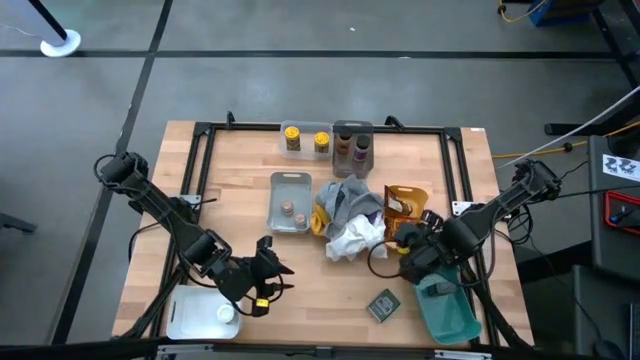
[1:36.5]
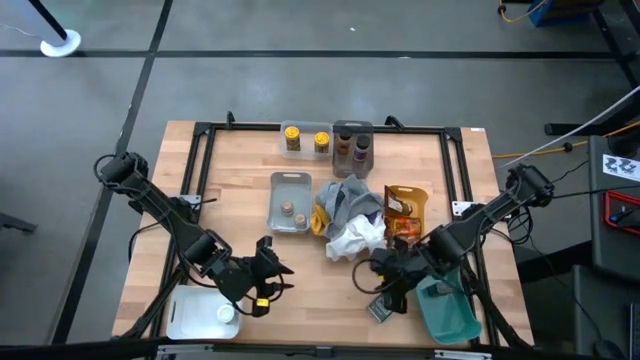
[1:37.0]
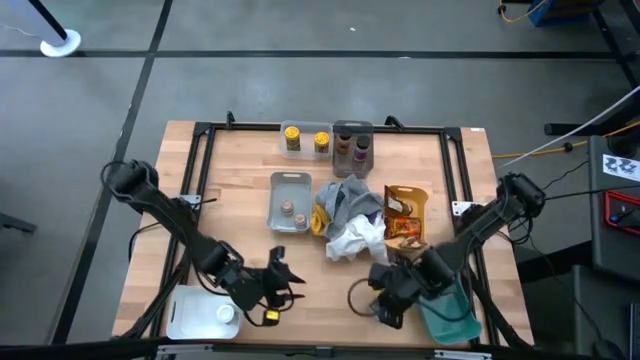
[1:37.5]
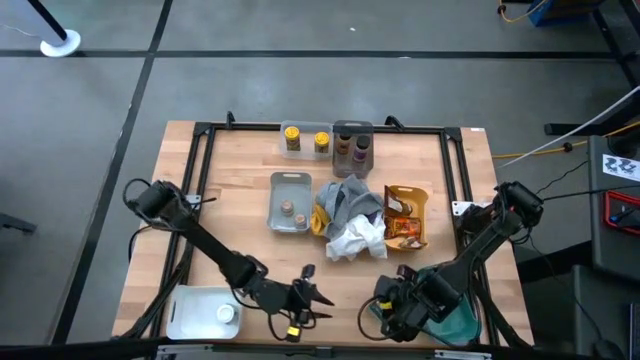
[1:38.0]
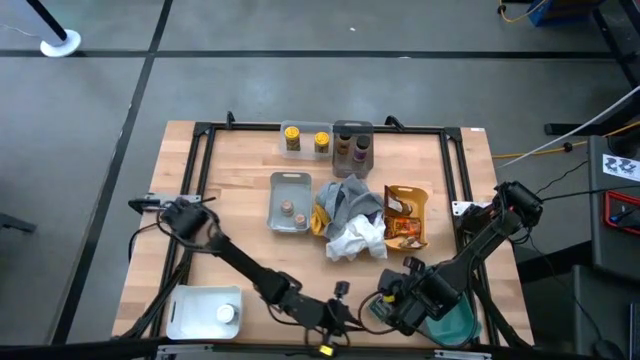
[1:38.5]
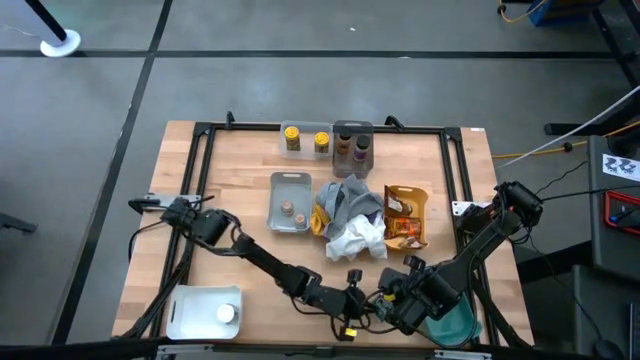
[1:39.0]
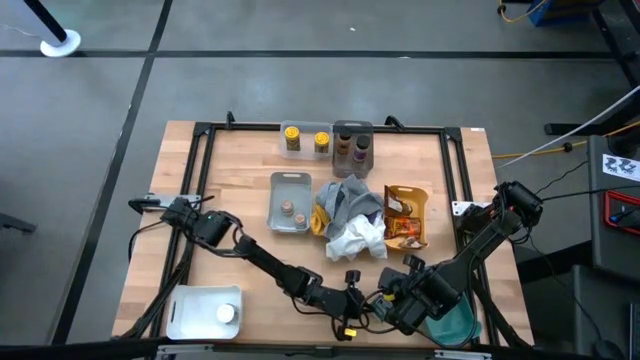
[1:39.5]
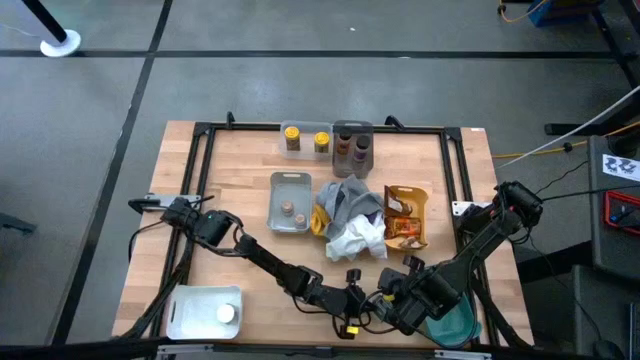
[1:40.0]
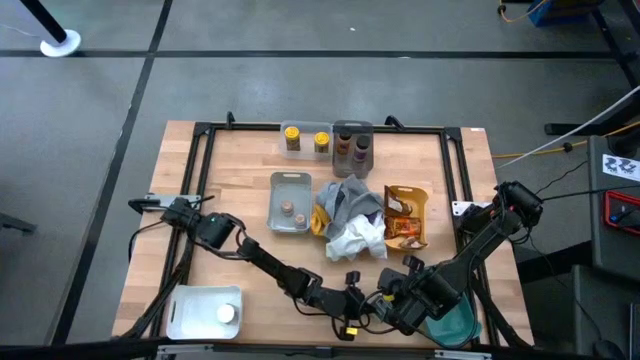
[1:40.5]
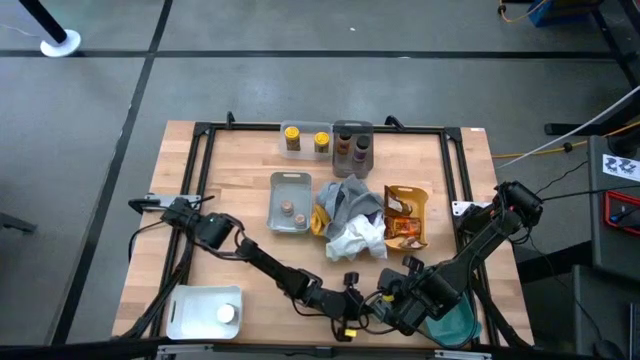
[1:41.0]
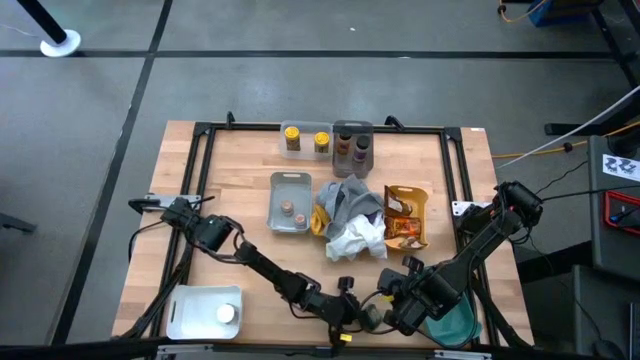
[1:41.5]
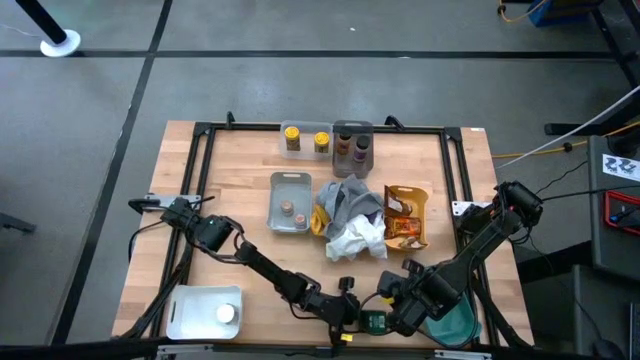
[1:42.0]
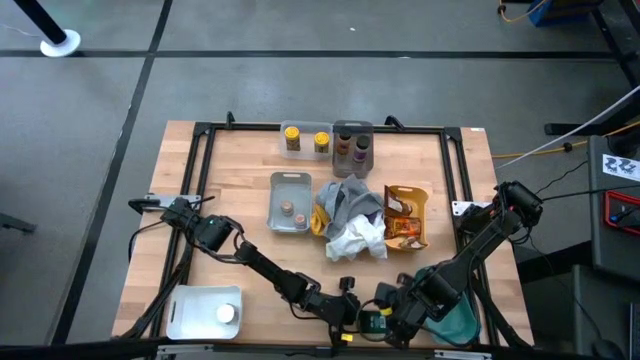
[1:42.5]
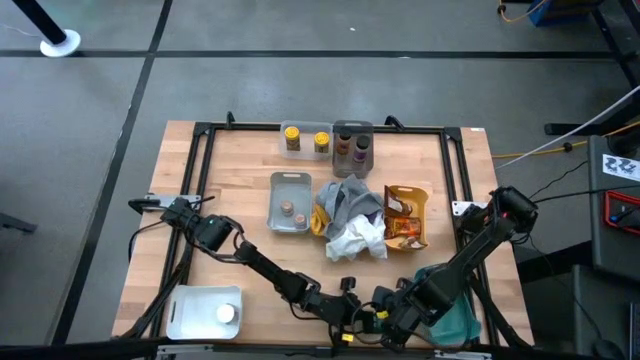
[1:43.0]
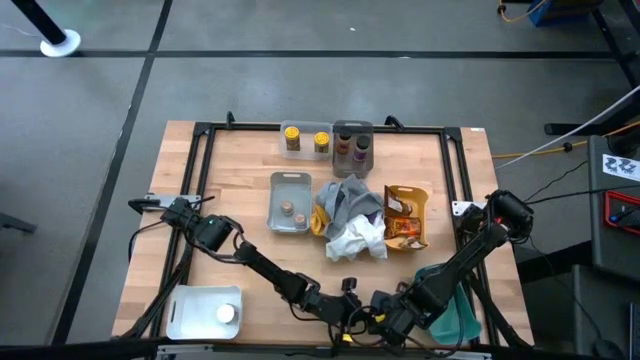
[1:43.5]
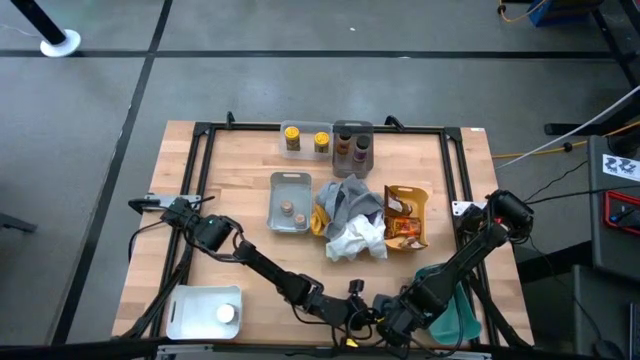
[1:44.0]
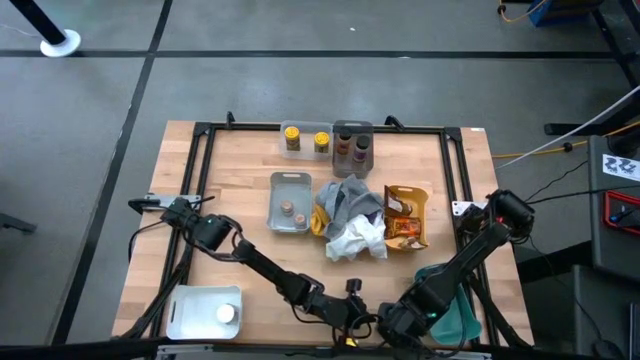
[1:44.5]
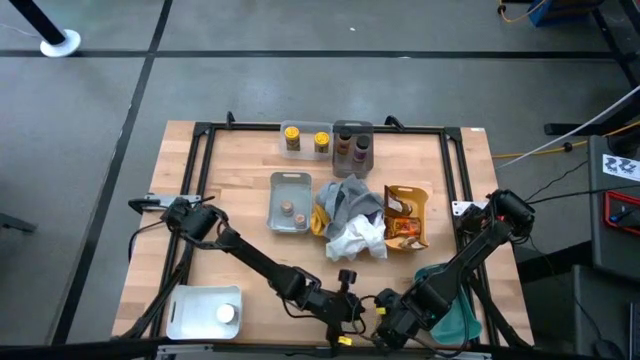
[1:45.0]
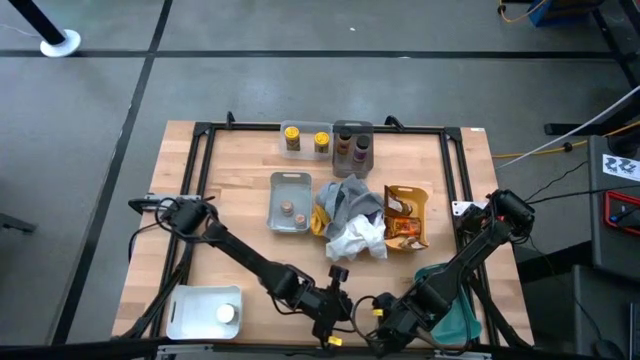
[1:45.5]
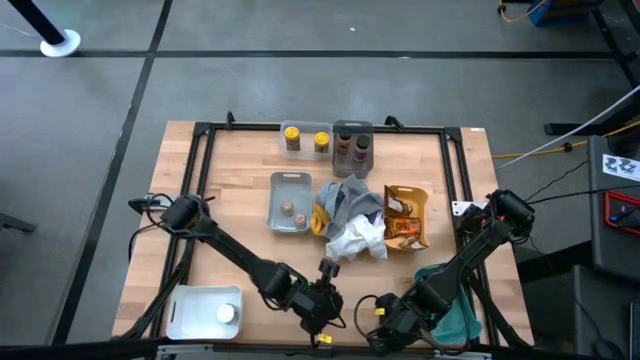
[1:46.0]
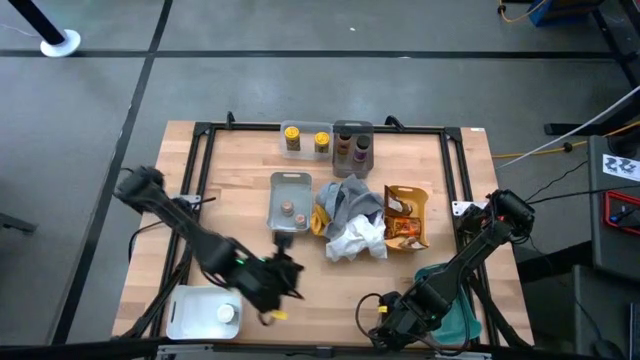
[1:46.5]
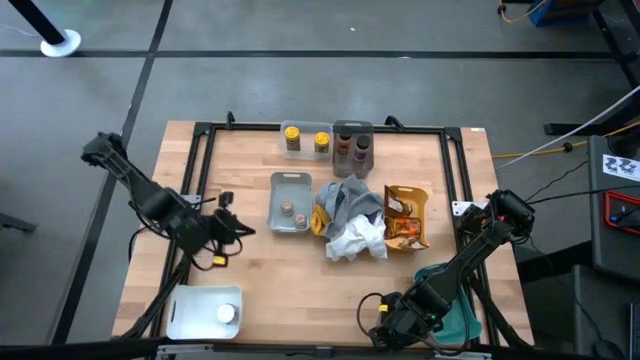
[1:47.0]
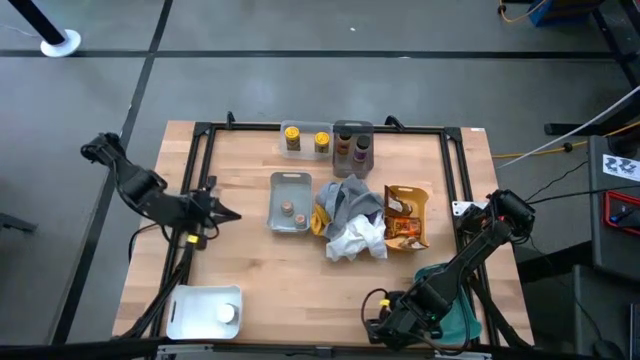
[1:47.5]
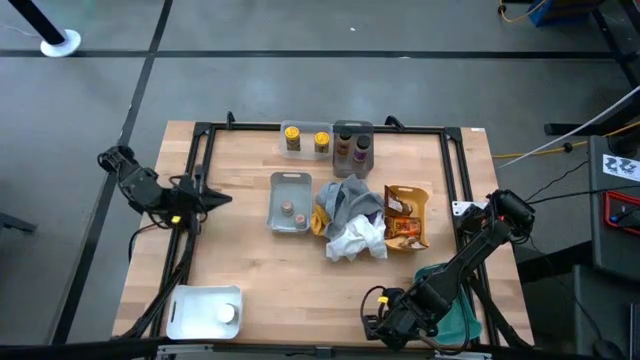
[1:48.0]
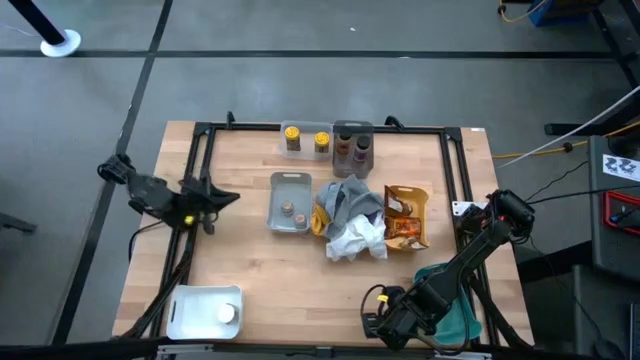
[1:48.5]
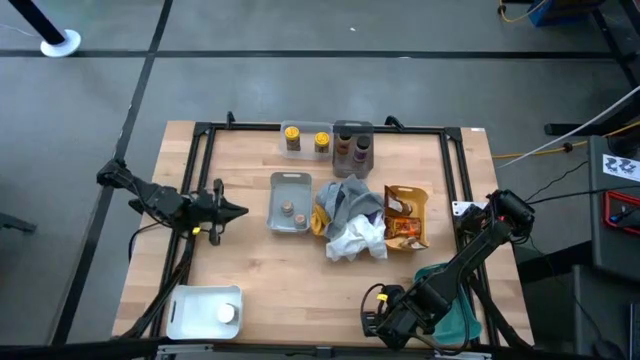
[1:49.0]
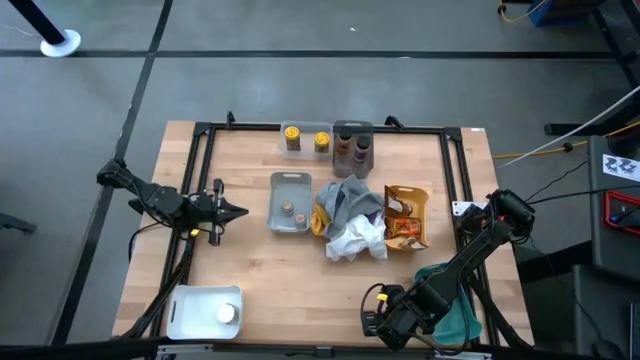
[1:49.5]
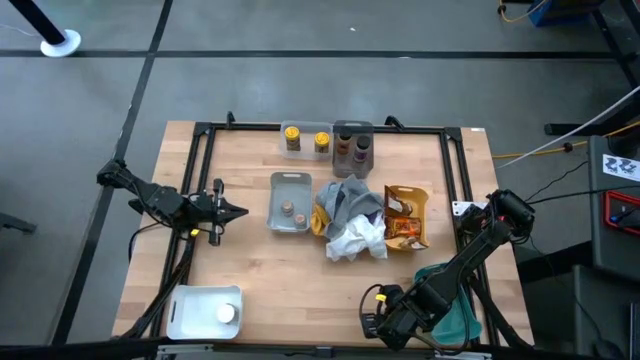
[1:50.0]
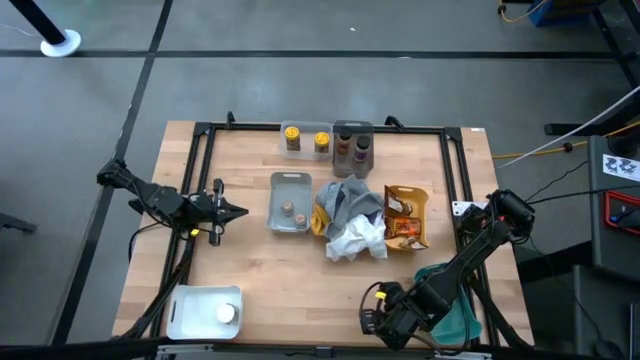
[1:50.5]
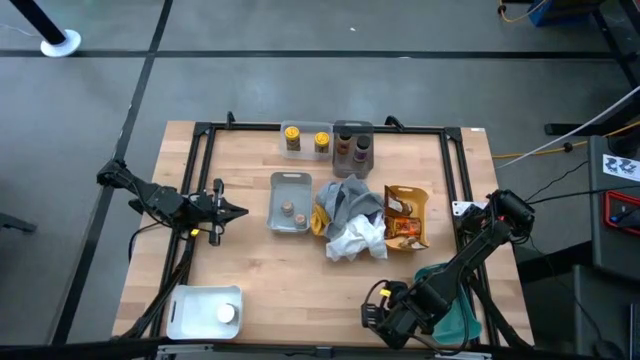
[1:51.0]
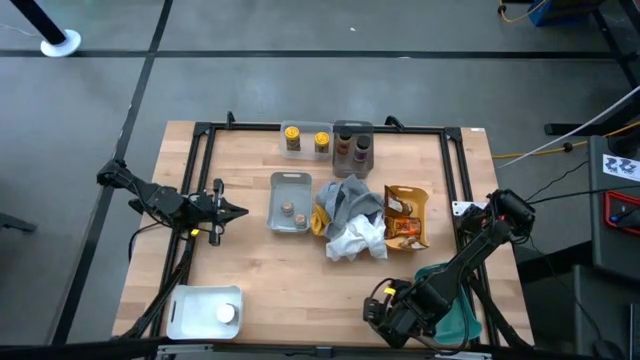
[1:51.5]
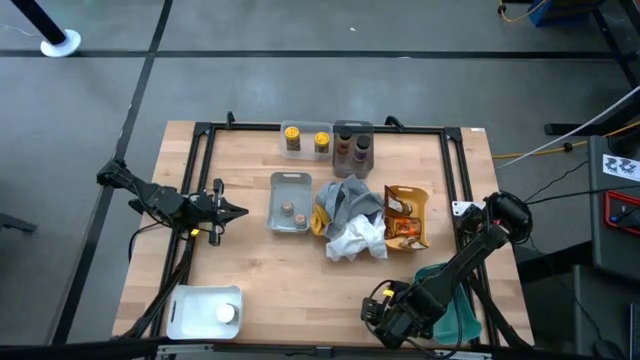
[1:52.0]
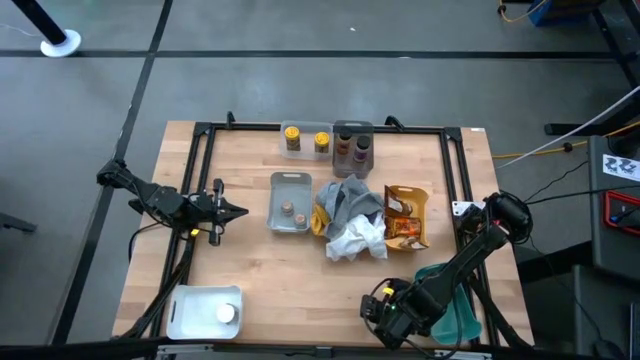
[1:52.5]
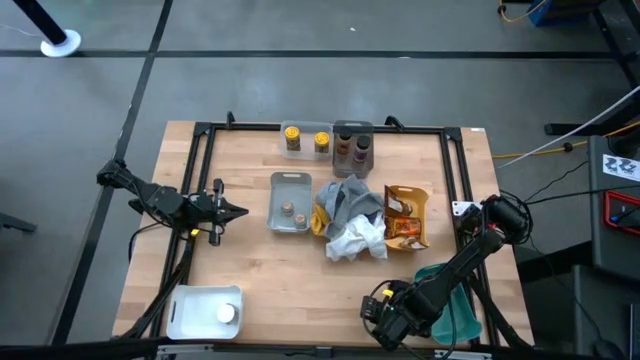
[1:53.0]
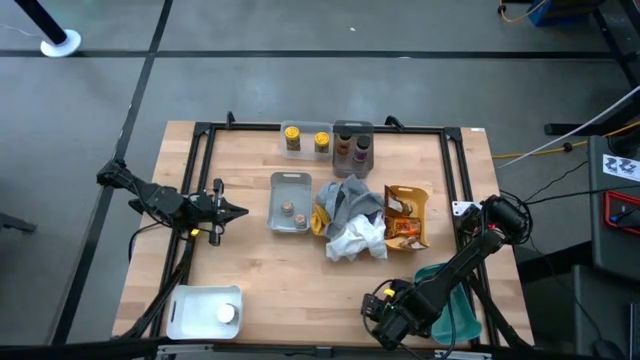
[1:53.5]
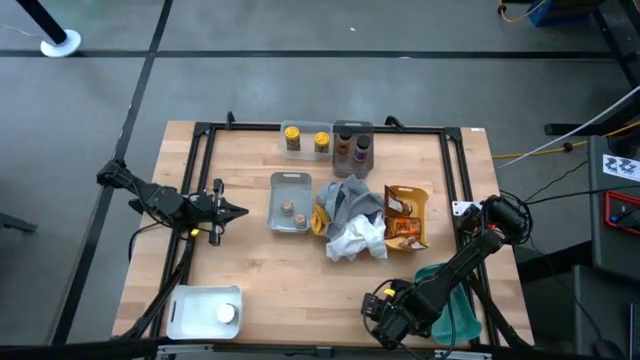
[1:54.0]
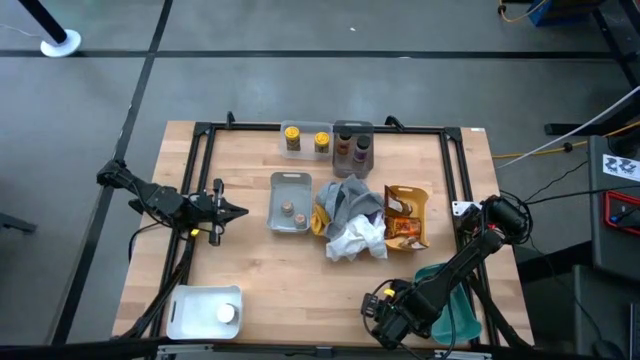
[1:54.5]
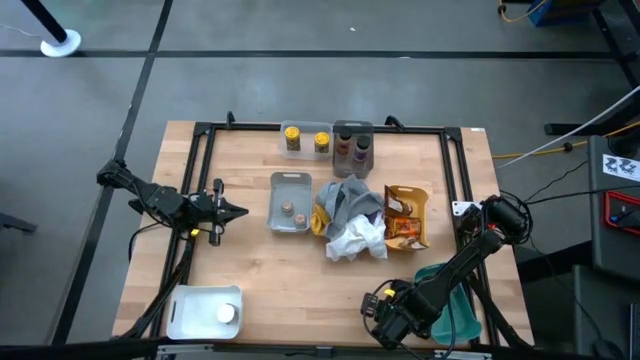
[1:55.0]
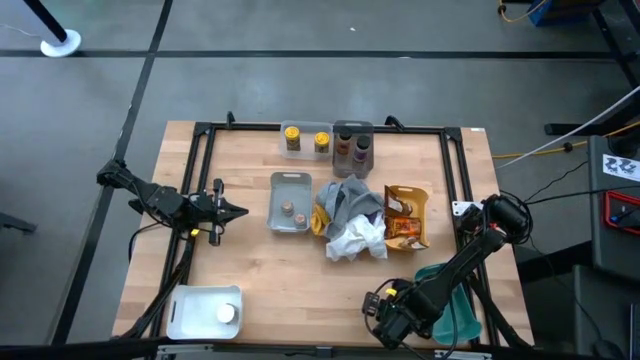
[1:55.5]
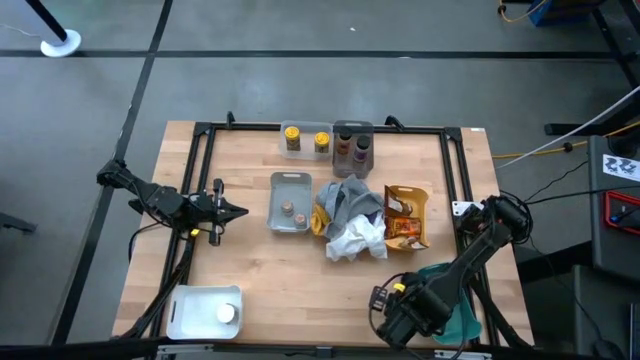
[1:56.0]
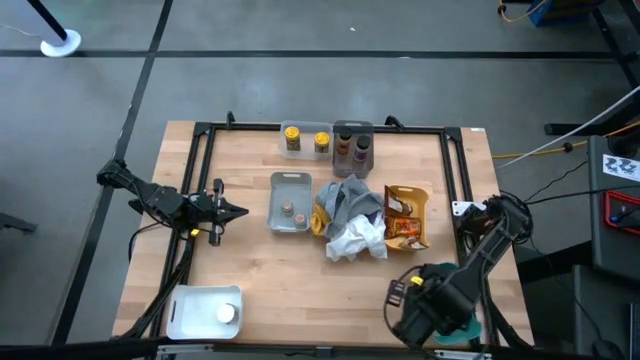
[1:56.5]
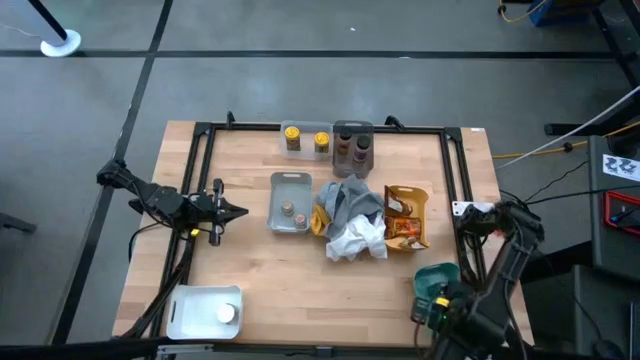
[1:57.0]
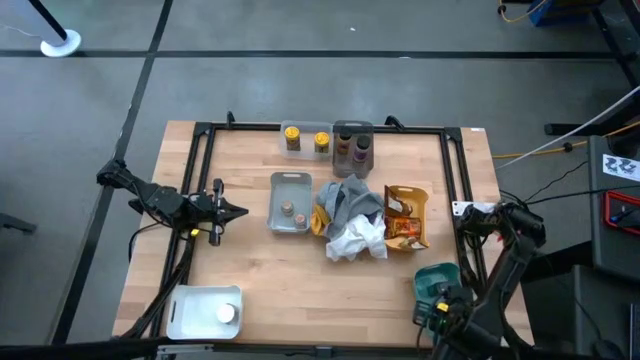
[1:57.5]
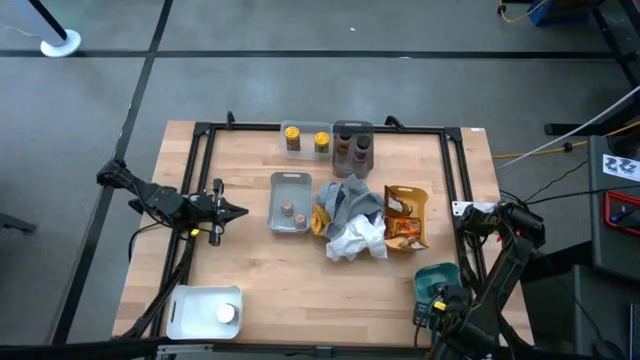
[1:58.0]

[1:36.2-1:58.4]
Task: Sort spices by type
Put the green seasoning can into the green bin
